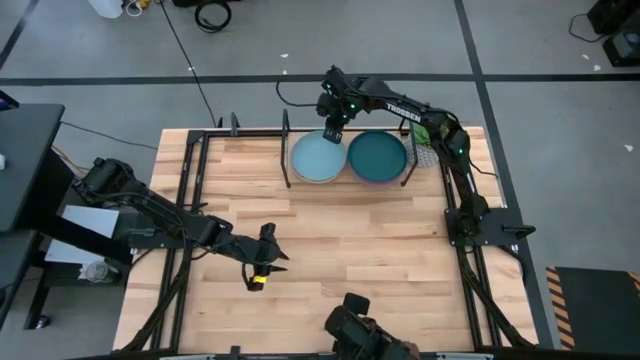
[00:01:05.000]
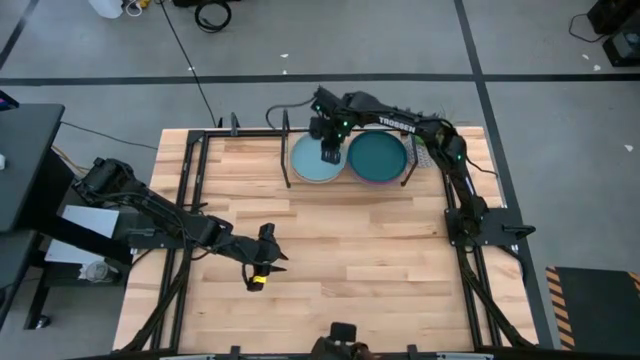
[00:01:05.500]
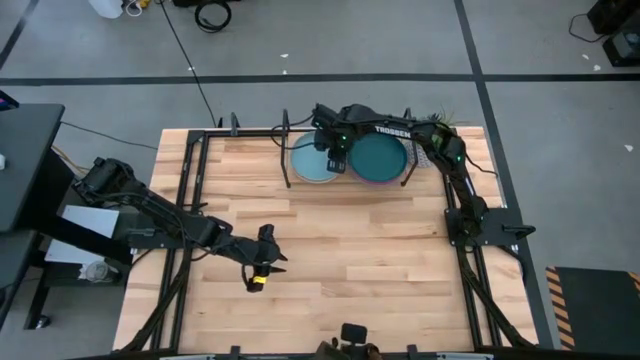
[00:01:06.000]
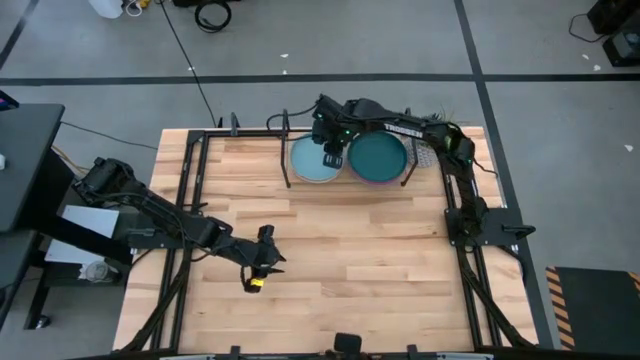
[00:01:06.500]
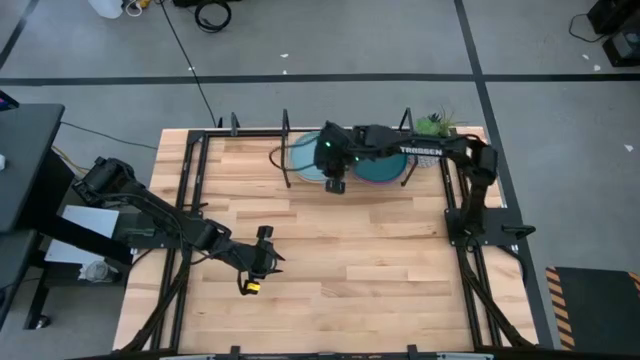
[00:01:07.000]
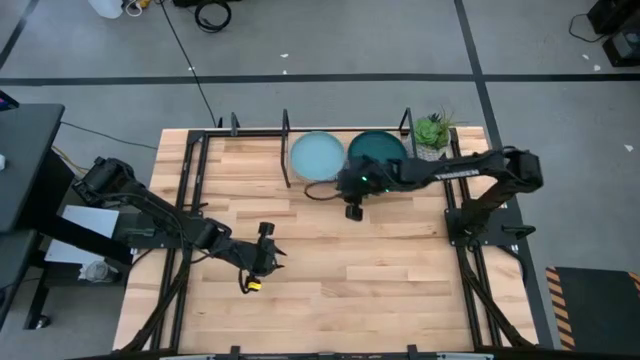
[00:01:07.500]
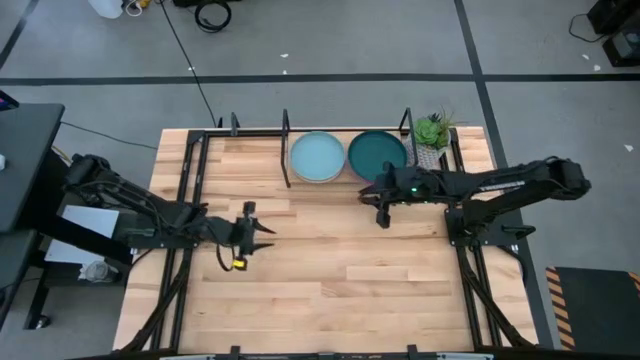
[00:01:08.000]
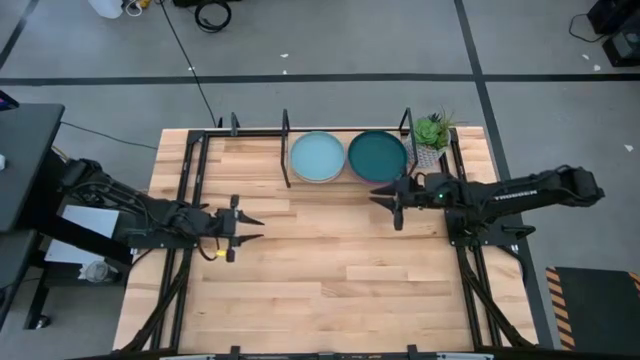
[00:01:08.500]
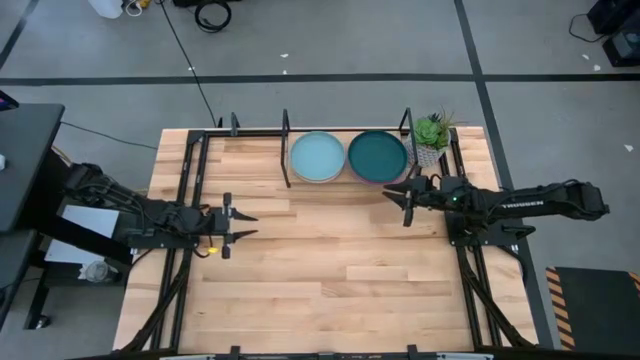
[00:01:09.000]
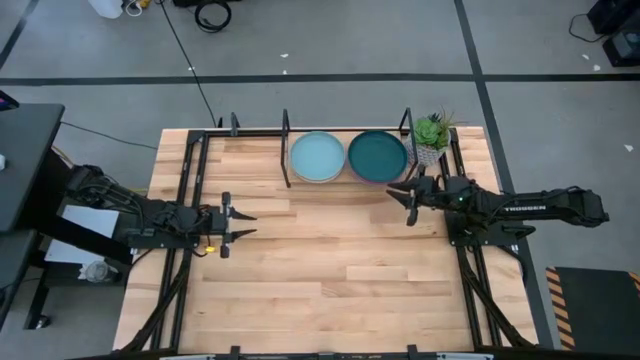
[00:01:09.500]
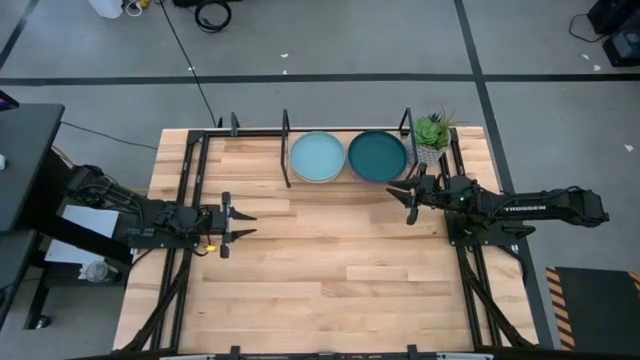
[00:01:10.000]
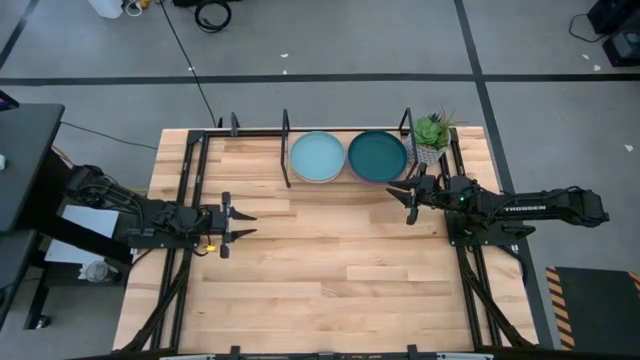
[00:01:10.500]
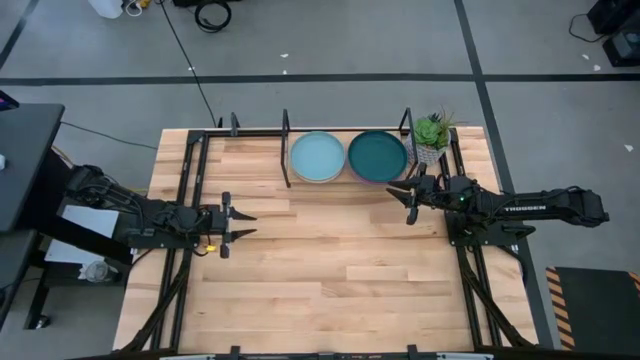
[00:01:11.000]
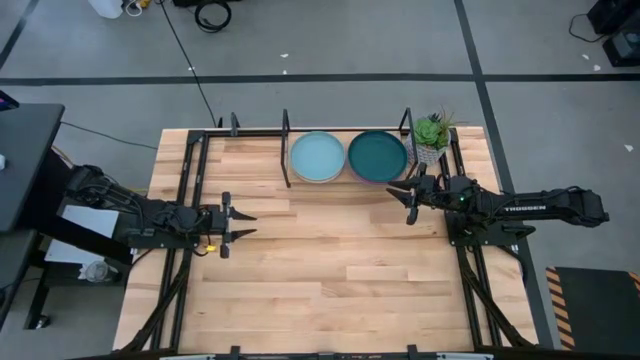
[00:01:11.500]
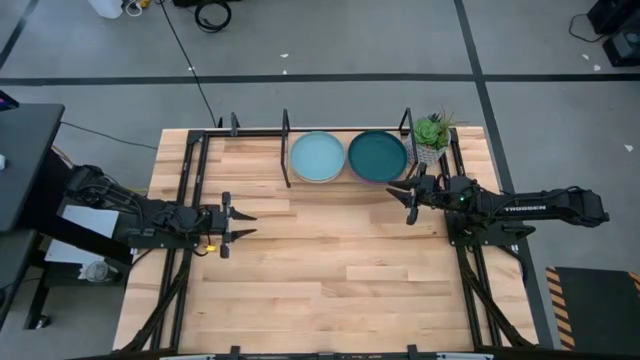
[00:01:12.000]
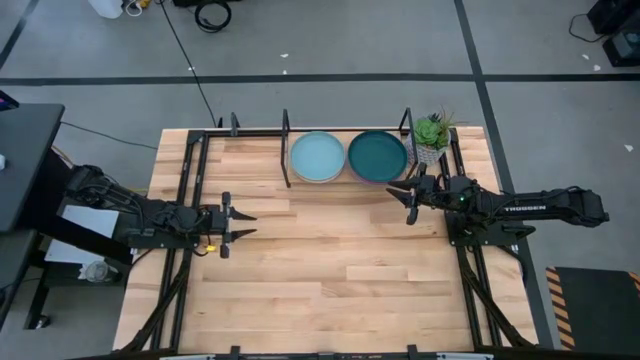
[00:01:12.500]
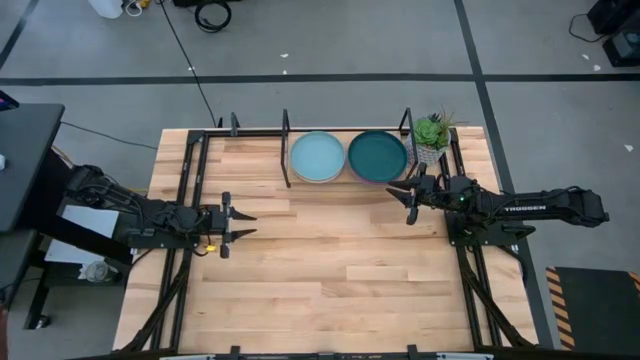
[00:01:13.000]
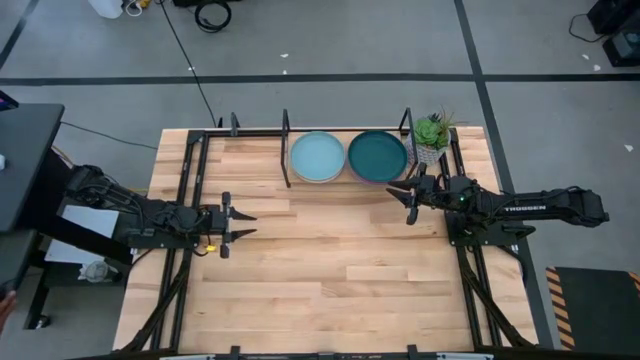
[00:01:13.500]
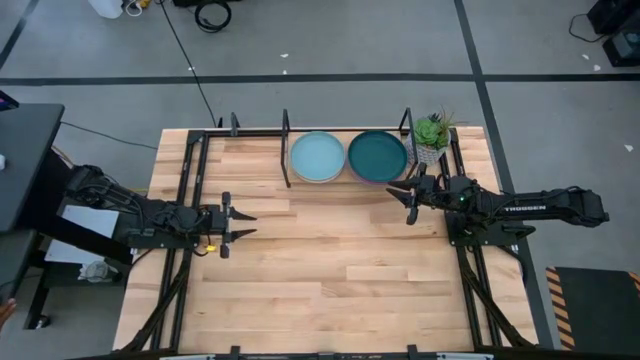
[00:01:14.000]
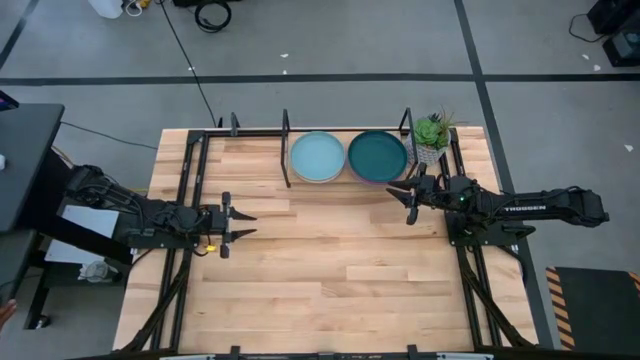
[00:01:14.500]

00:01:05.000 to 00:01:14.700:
Task: Place and stack plates onto a shelf
Return to Home Position

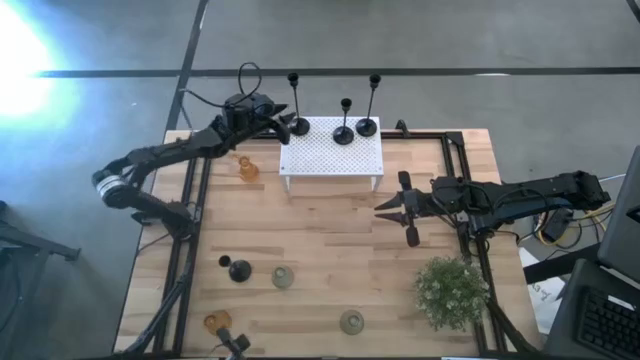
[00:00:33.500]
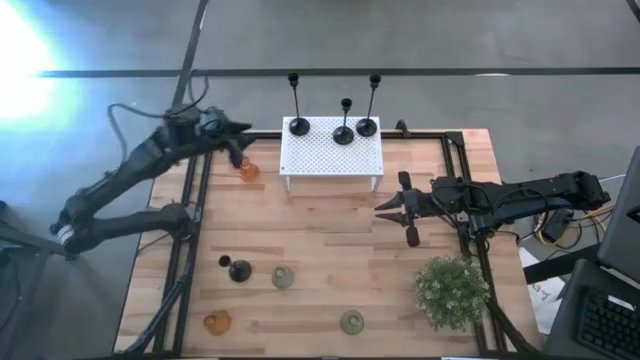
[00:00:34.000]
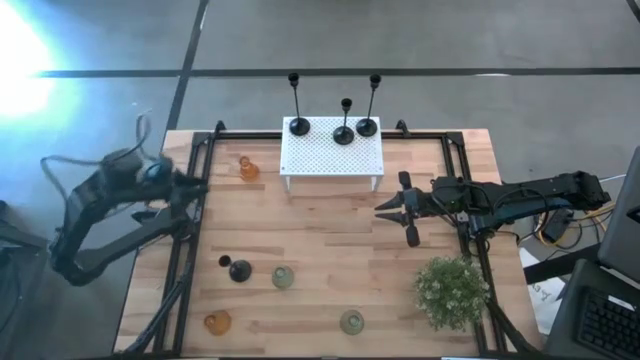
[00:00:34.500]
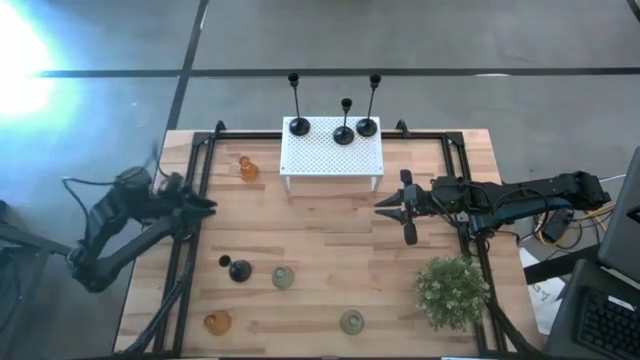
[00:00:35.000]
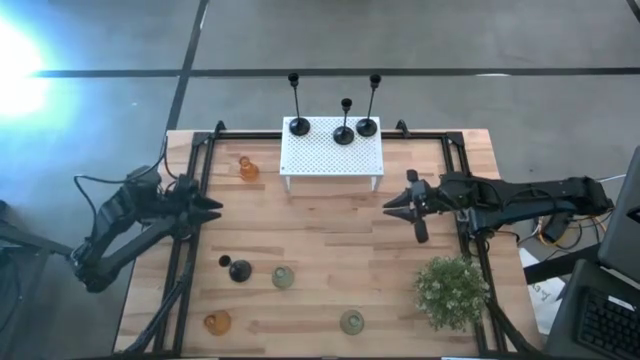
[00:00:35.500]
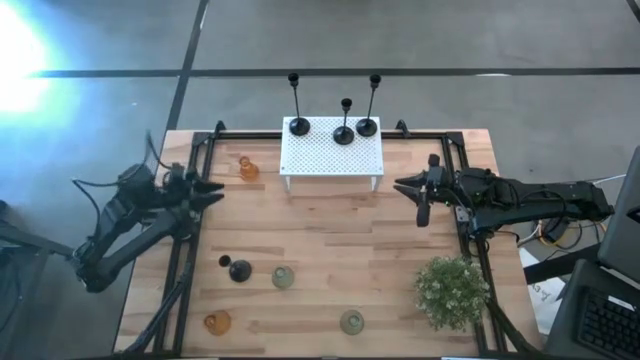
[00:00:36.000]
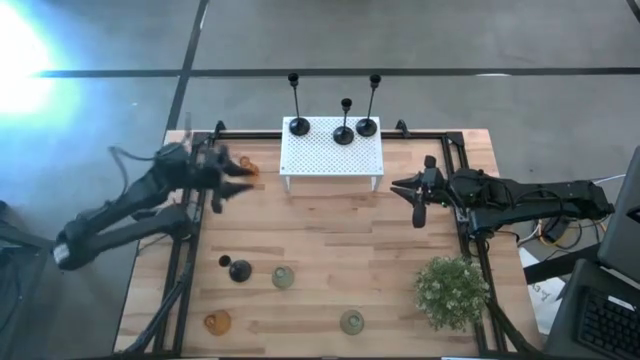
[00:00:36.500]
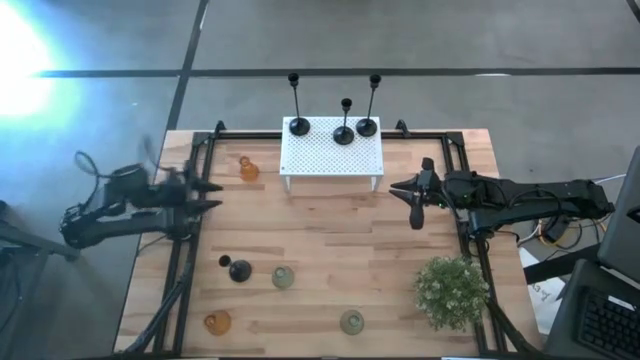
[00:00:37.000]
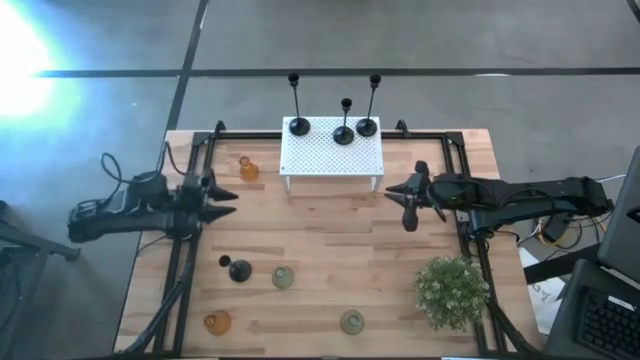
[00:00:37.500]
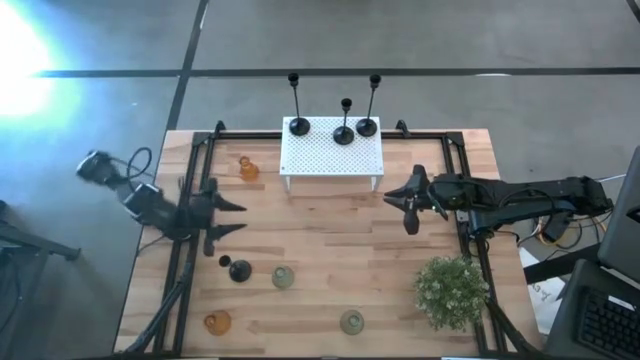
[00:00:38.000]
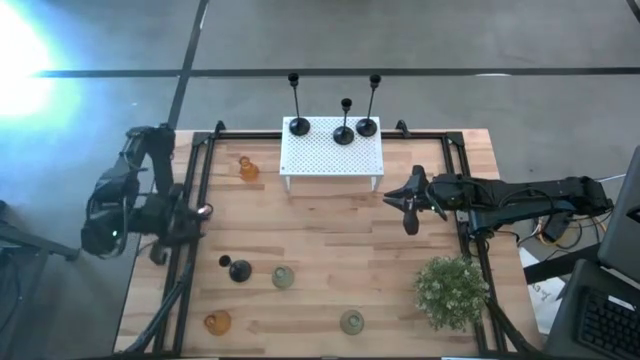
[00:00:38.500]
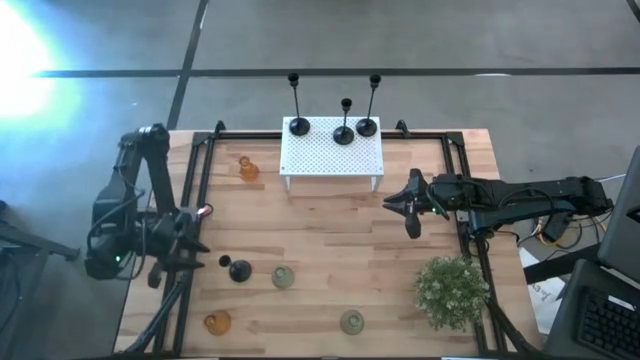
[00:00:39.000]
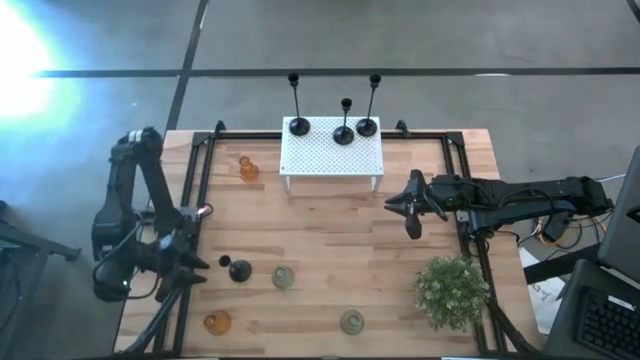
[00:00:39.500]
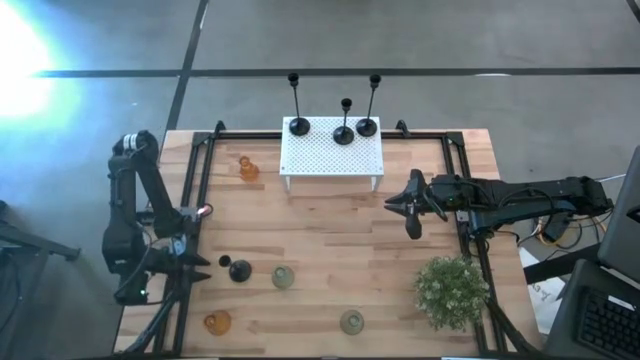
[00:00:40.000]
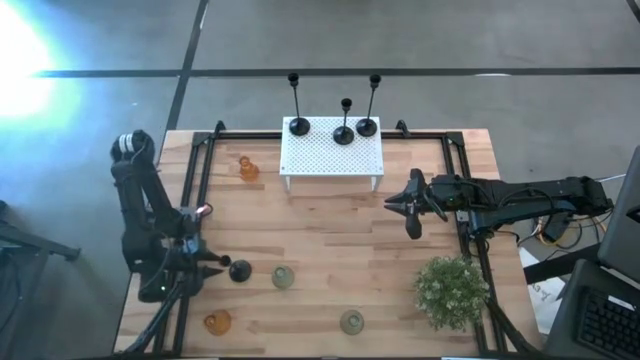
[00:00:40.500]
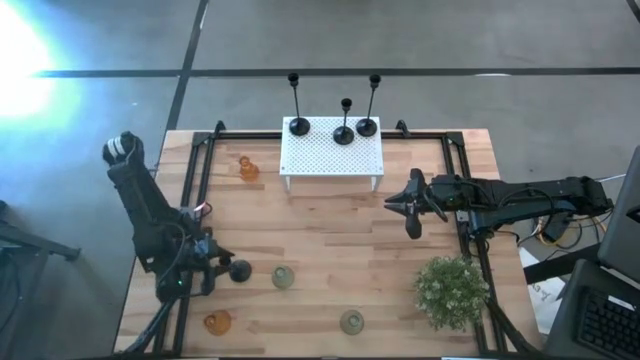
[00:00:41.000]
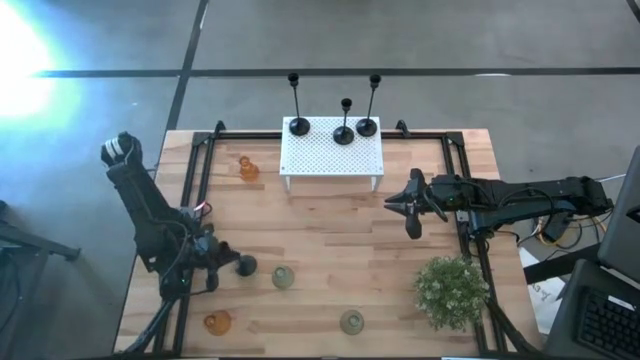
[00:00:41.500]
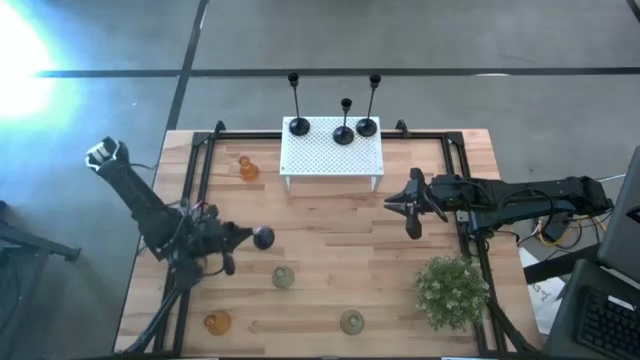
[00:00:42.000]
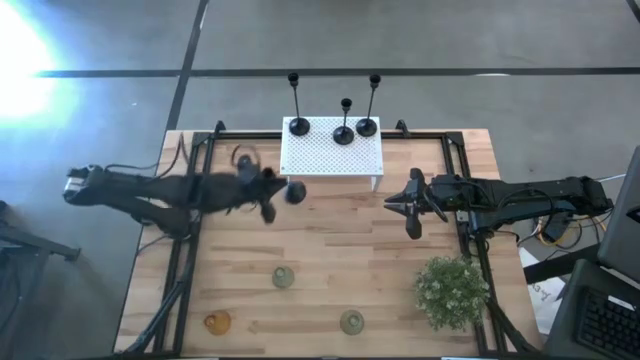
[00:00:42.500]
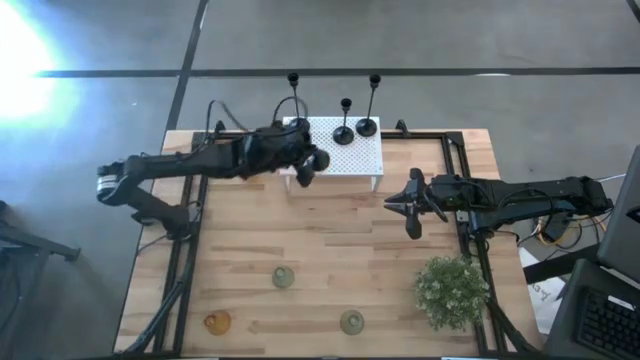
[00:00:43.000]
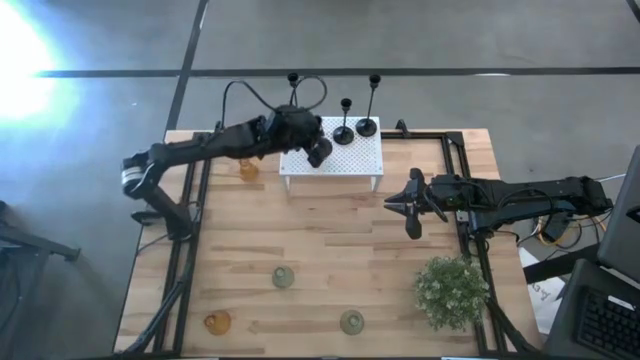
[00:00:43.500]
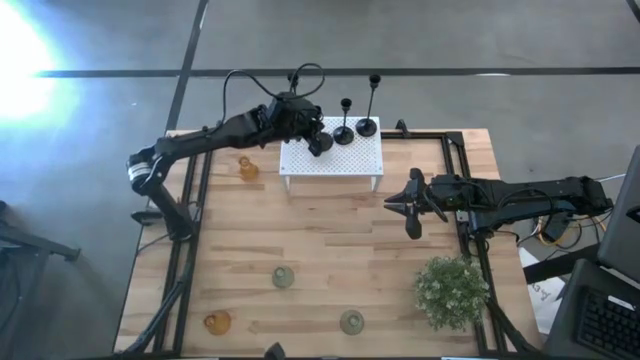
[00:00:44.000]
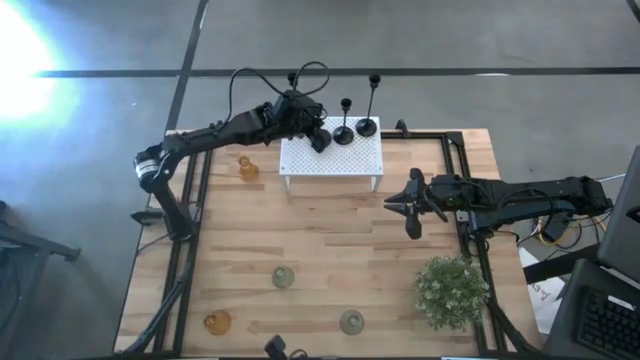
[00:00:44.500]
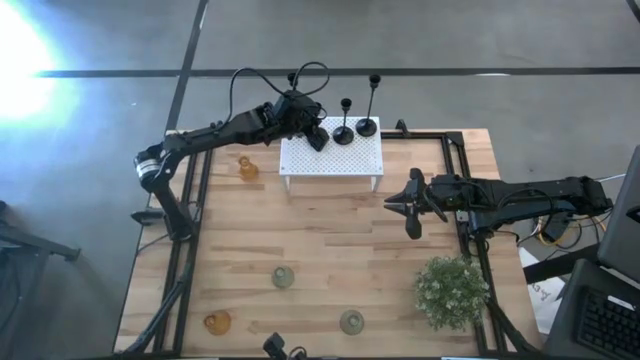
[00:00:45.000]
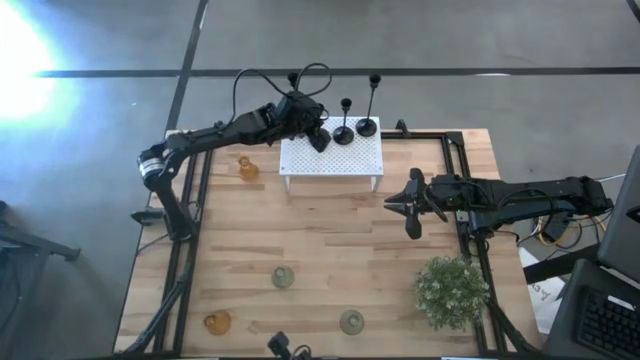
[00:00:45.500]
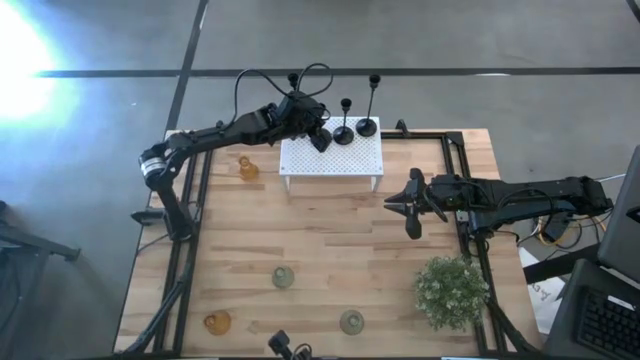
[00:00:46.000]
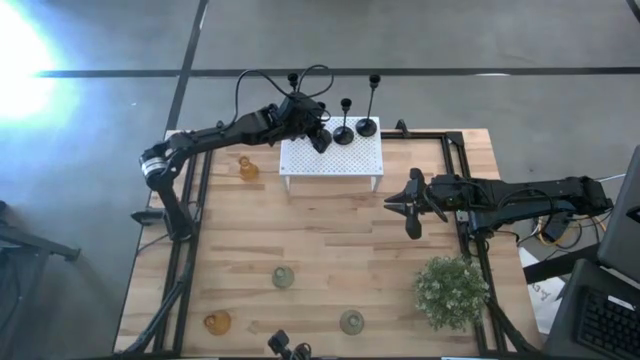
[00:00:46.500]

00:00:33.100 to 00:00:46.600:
Task: Pick & Place candle stick holders
Put the black candle holder on the shelf
